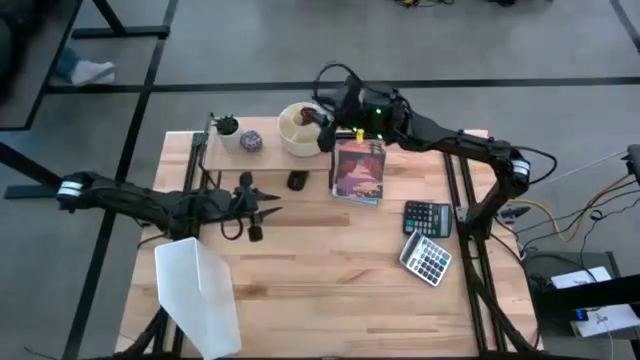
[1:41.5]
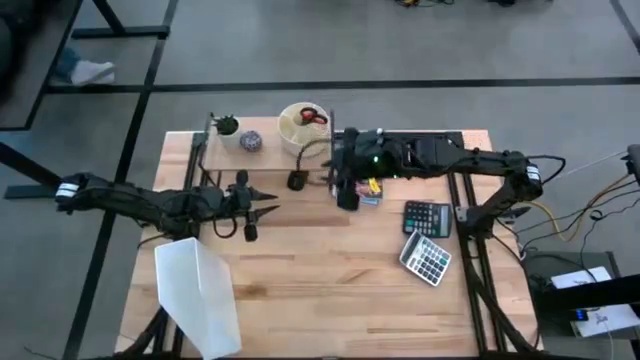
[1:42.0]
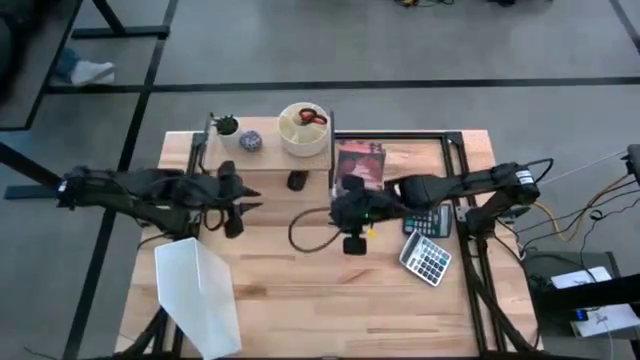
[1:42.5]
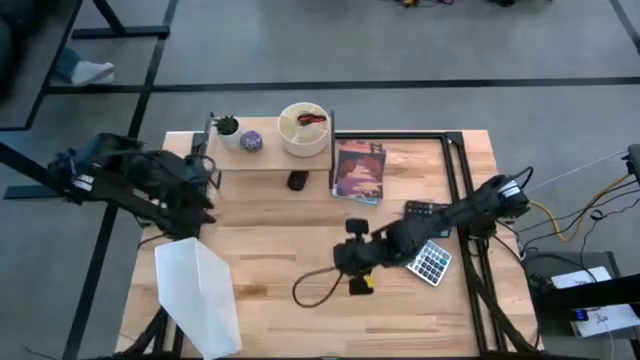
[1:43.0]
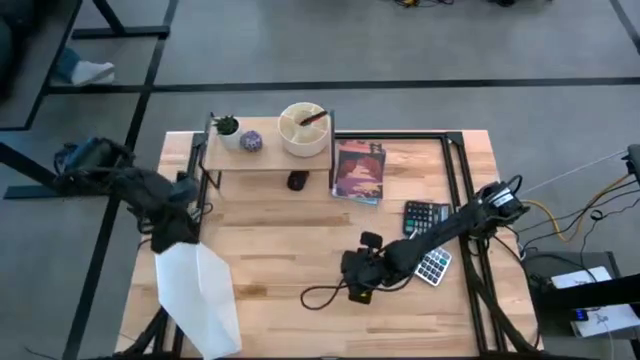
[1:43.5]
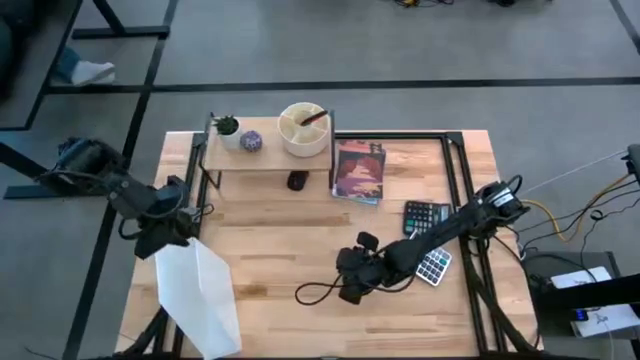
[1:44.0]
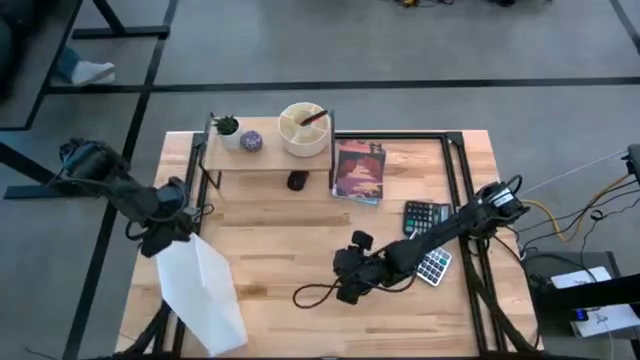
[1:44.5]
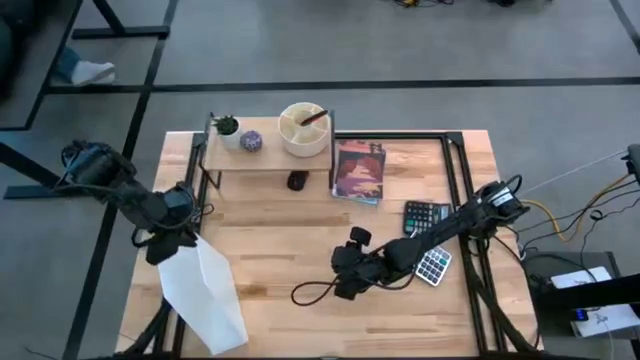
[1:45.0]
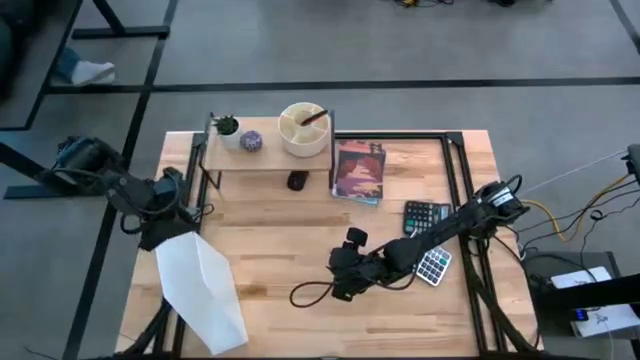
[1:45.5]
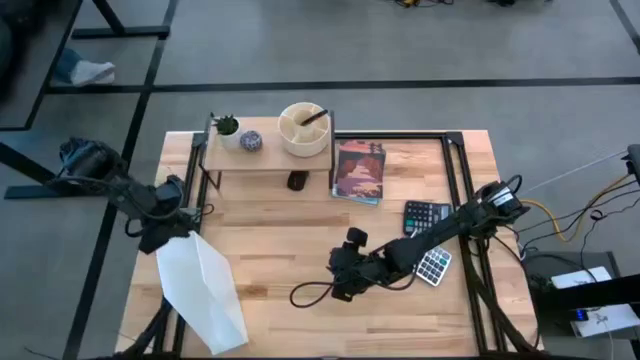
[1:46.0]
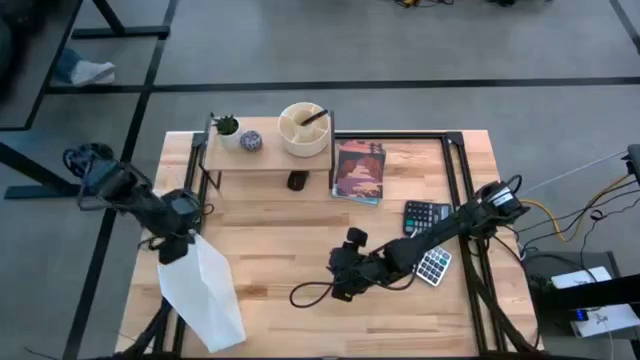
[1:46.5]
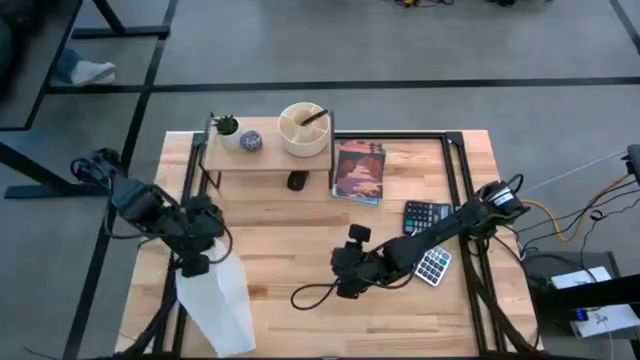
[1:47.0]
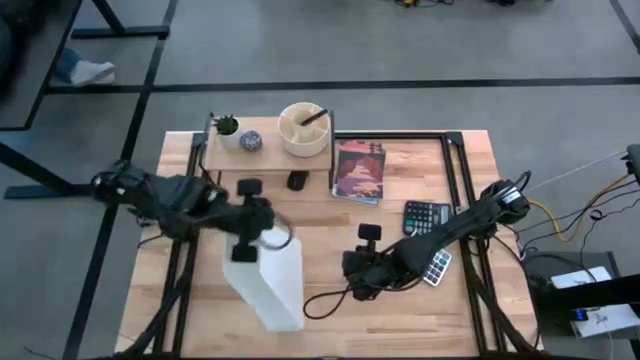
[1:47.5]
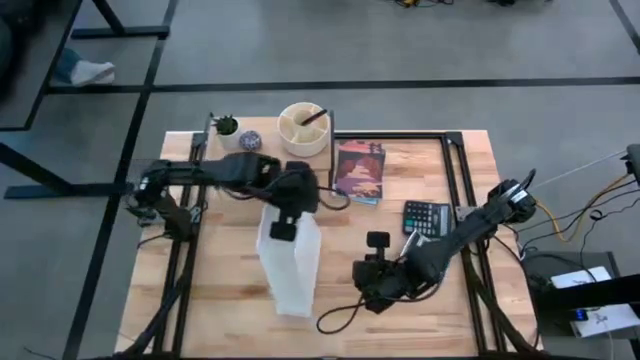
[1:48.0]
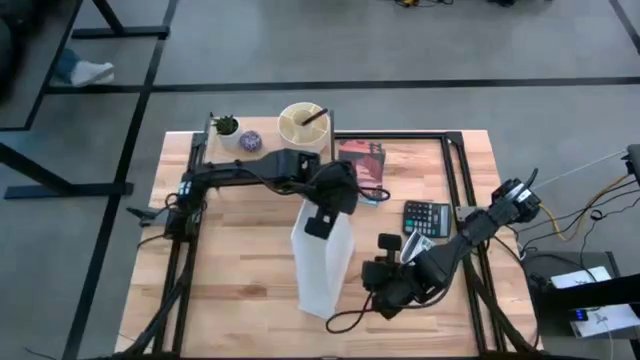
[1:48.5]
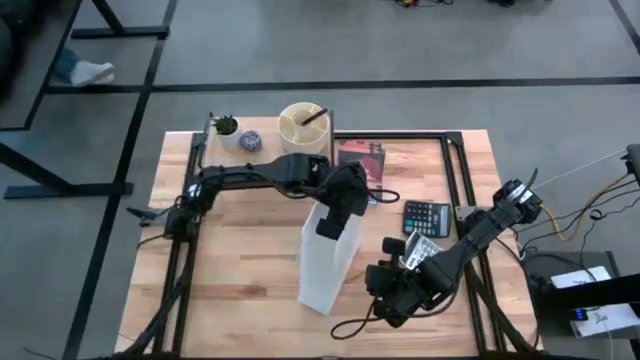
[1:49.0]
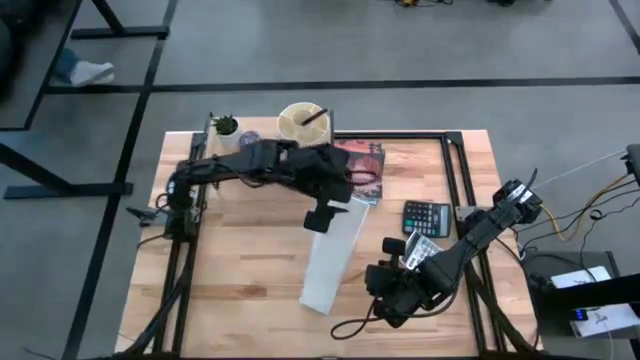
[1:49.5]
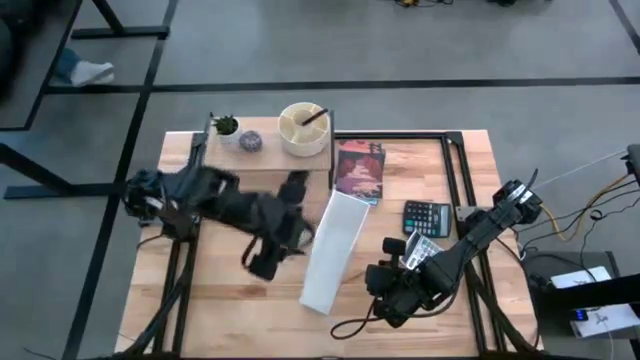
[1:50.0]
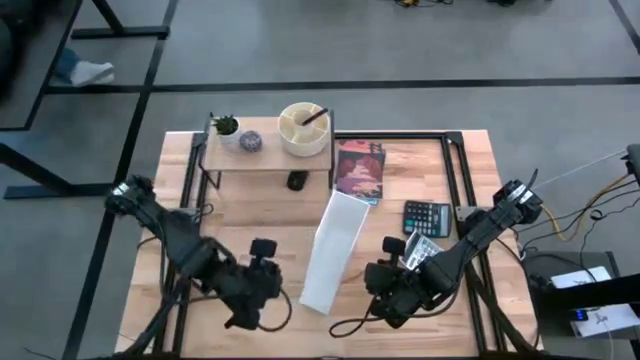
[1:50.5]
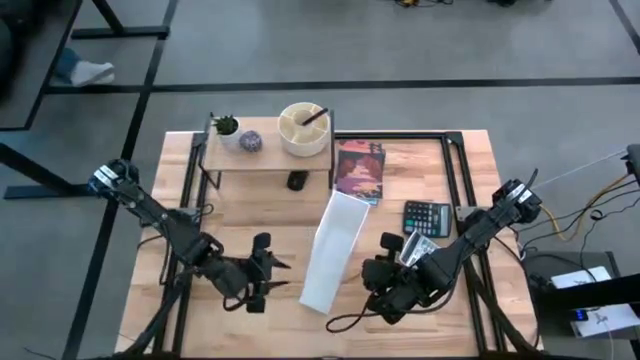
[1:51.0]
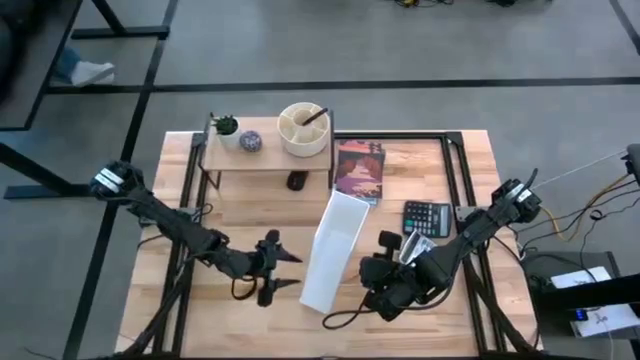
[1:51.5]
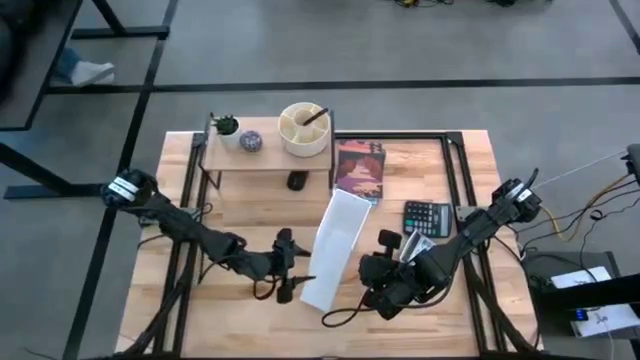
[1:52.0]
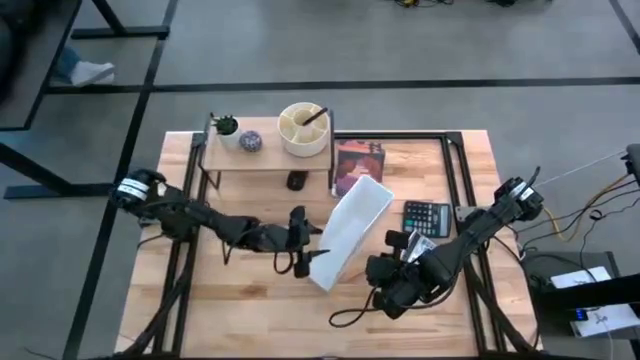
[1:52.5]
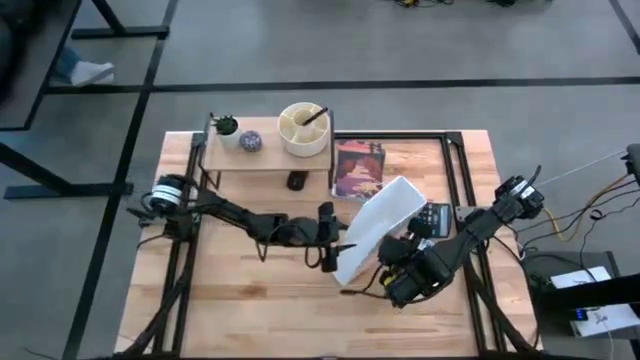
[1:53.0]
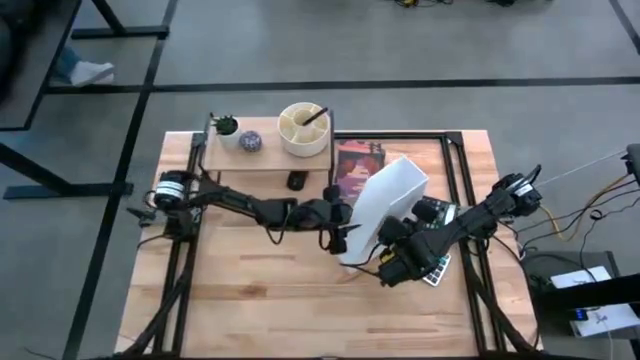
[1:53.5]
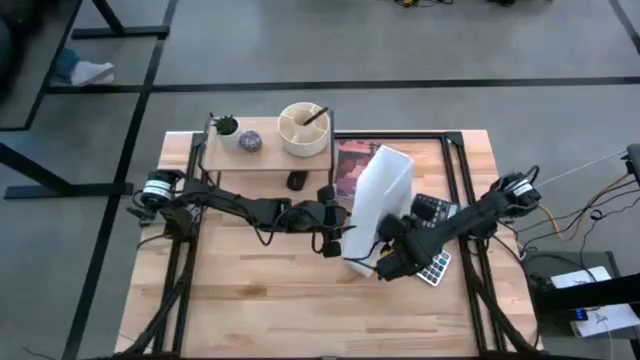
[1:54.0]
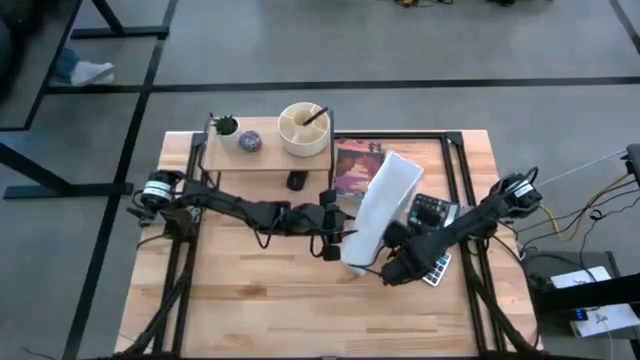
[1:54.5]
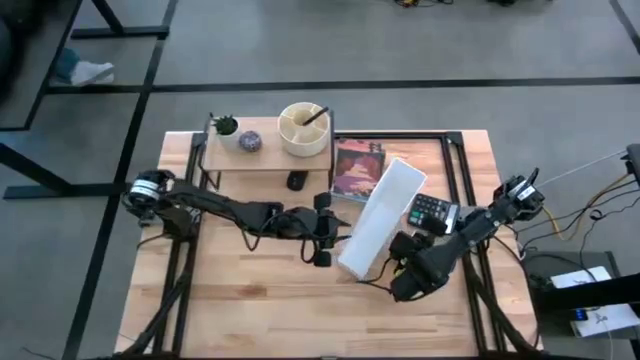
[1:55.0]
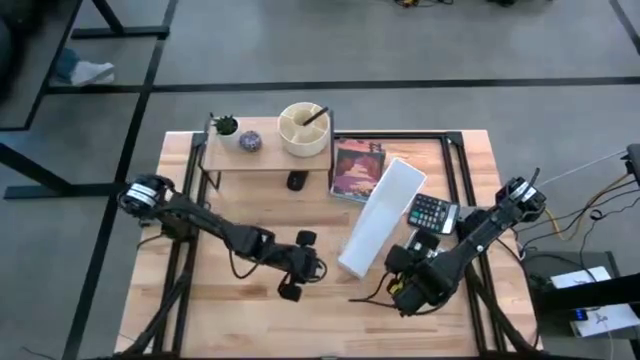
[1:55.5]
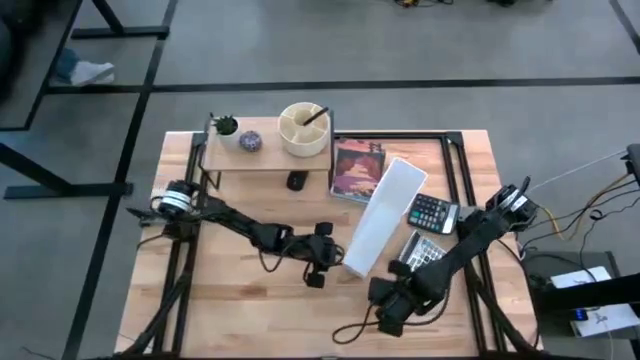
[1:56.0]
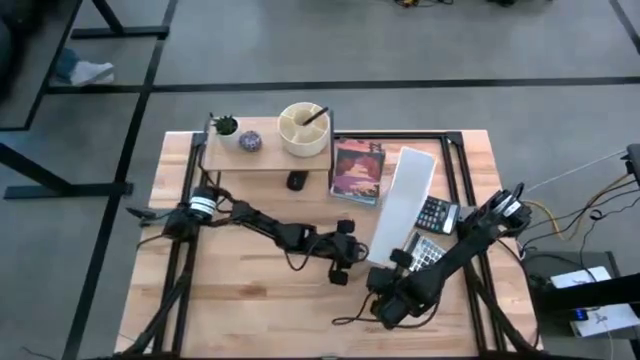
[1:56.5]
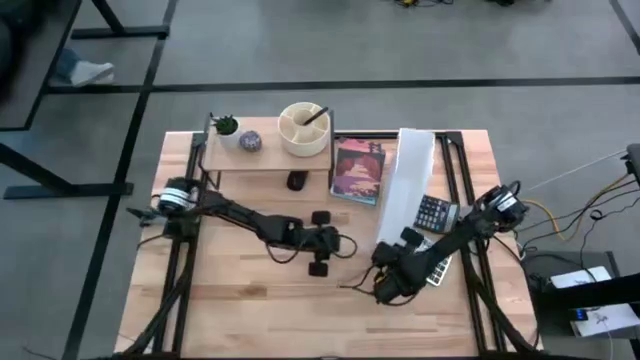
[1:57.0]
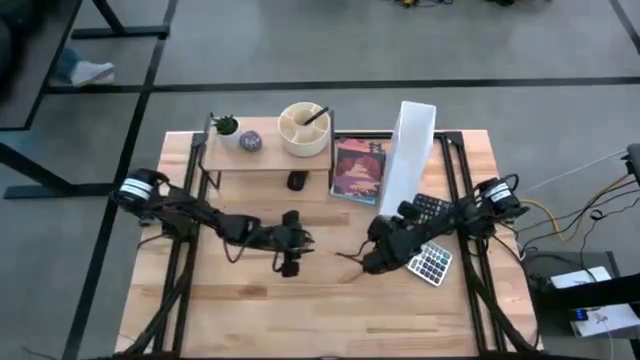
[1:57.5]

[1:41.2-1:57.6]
Task: Stock shelves
Move the white file holder to the top right of the table

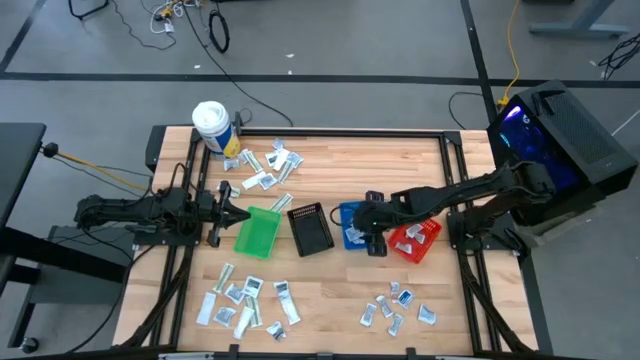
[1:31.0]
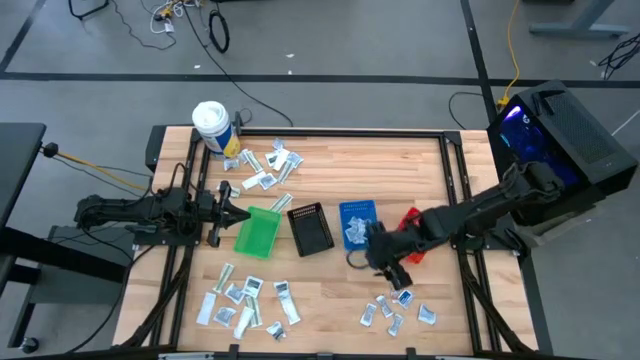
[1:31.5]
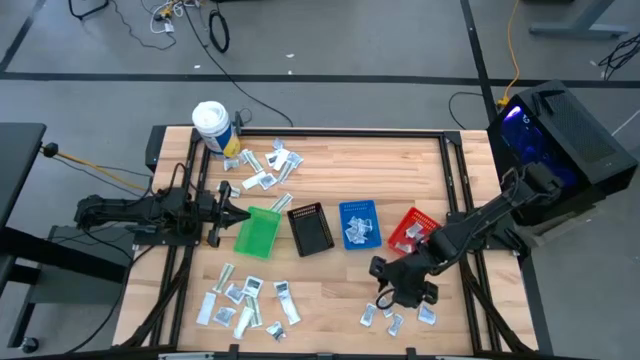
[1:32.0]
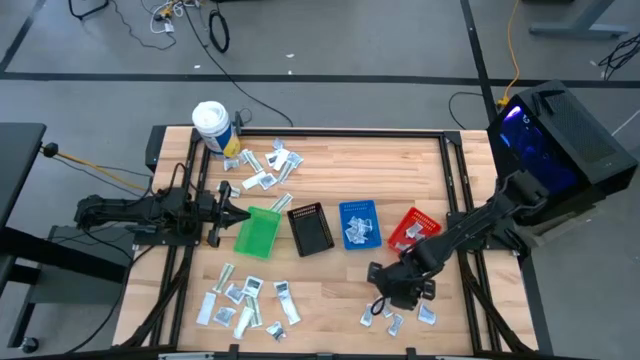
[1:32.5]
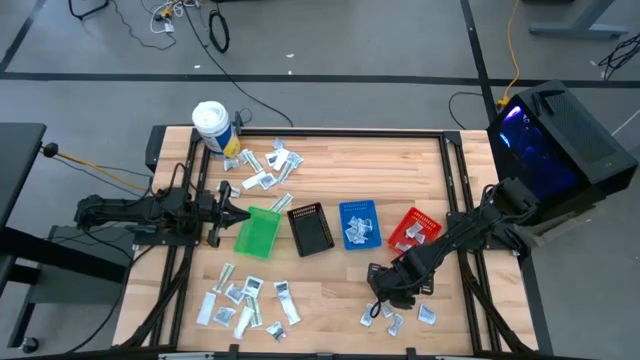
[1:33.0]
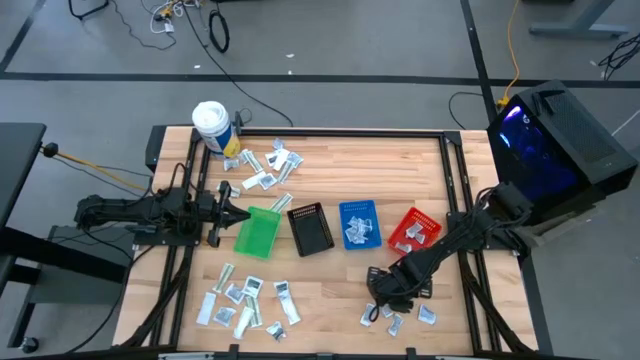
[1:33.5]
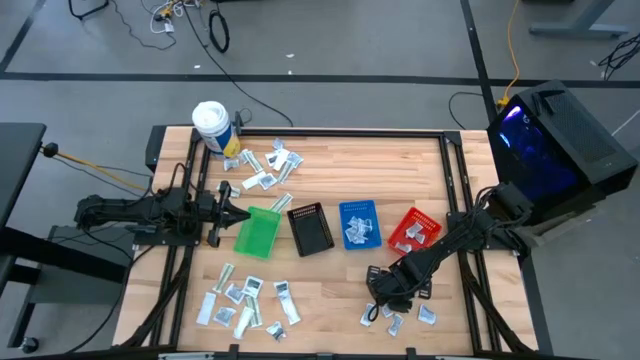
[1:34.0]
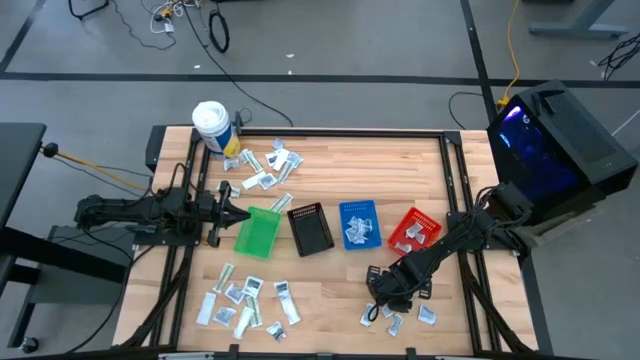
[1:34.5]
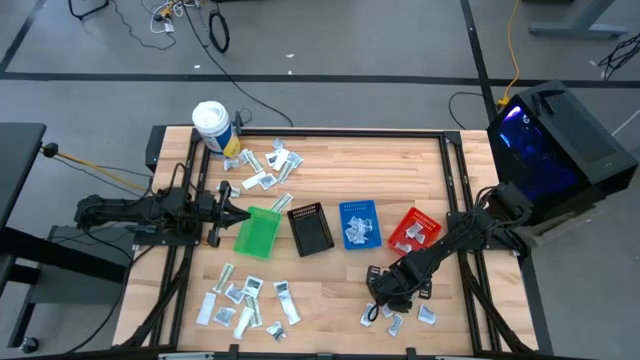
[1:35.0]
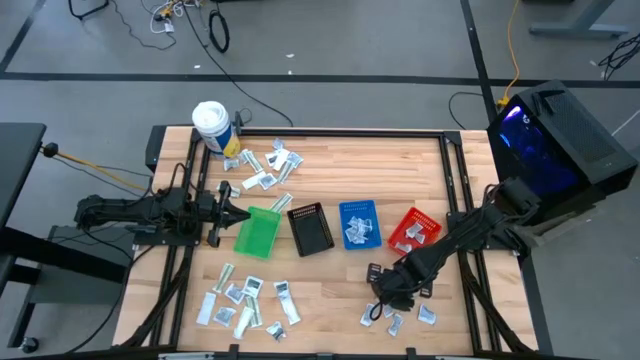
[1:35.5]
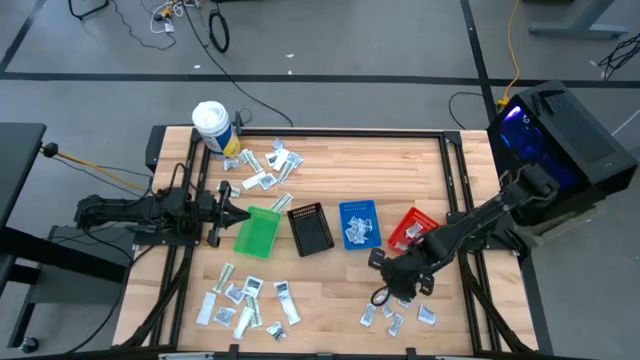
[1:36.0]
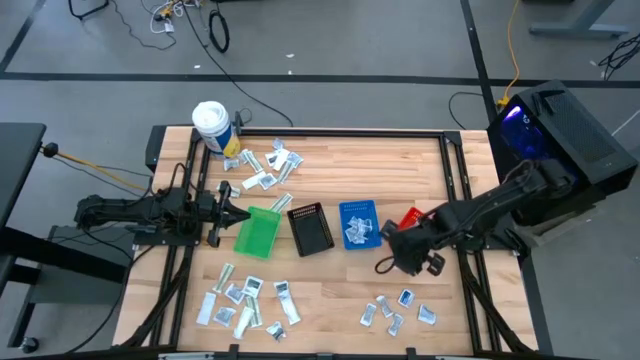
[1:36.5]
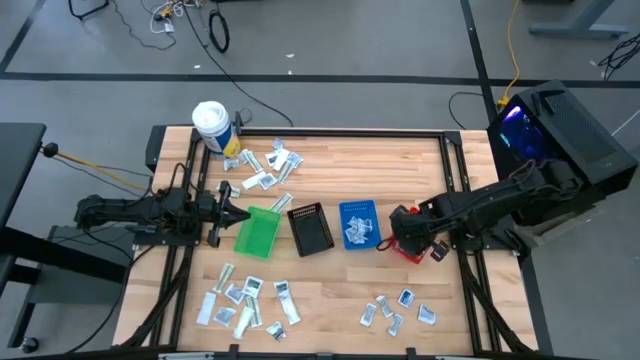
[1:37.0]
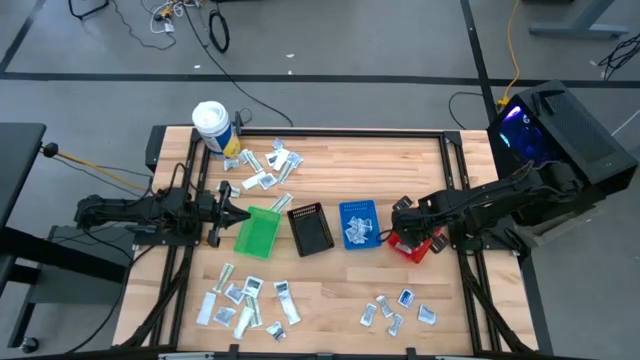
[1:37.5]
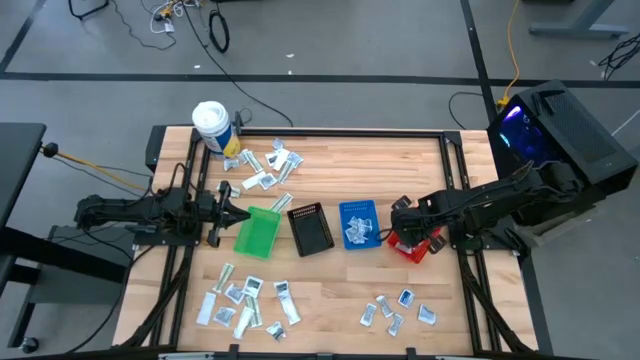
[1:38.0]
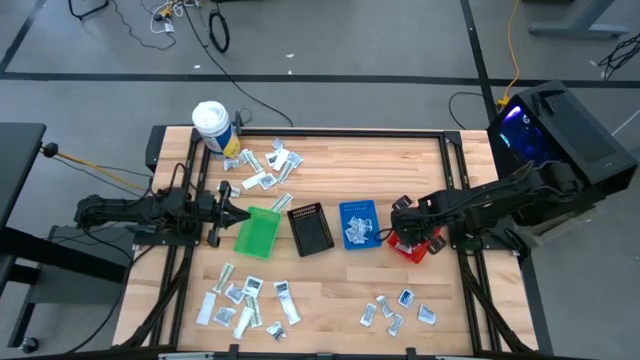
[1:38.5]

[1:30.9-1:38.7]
Task: Pick & Place First Aid Supplies
Put the ointment pack into the red basket
